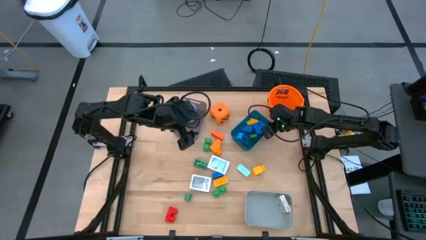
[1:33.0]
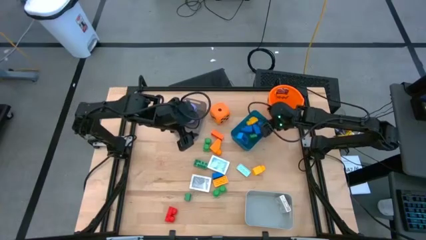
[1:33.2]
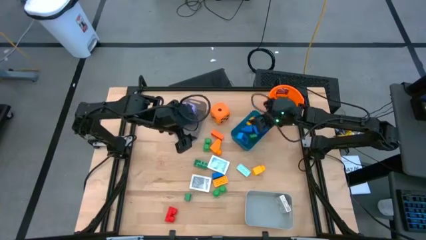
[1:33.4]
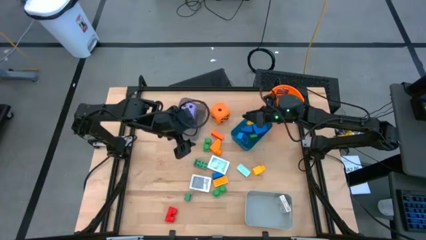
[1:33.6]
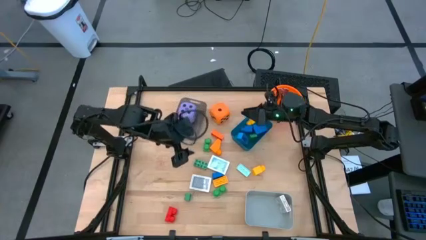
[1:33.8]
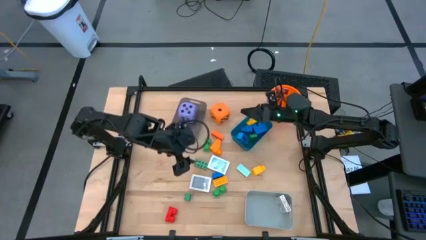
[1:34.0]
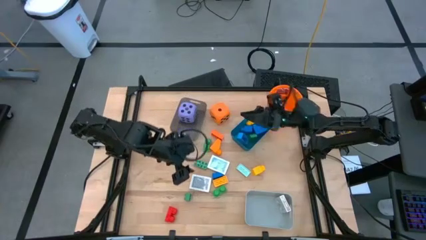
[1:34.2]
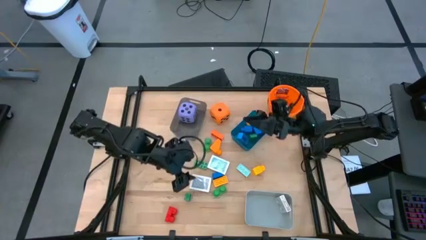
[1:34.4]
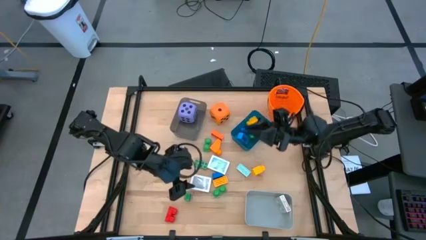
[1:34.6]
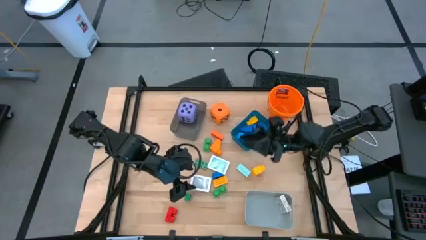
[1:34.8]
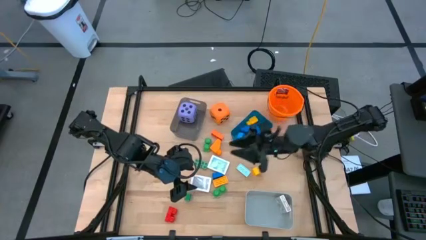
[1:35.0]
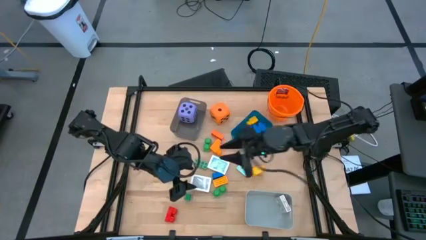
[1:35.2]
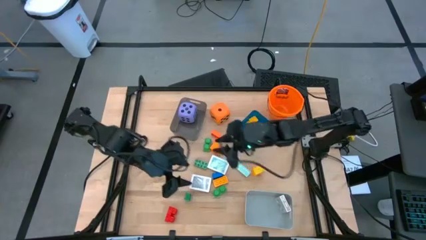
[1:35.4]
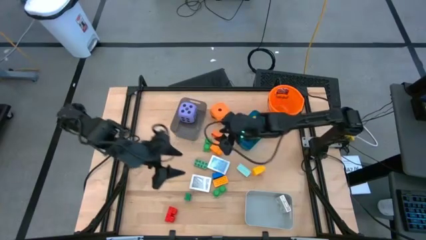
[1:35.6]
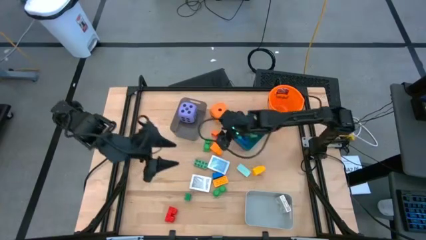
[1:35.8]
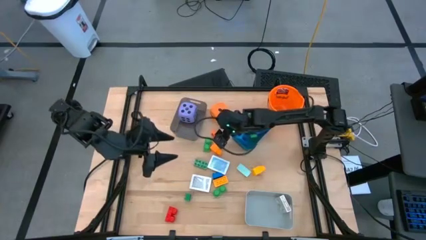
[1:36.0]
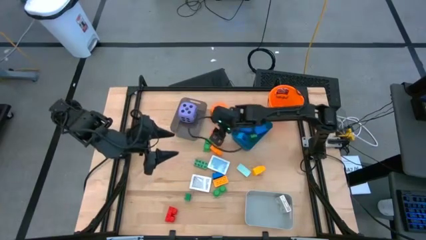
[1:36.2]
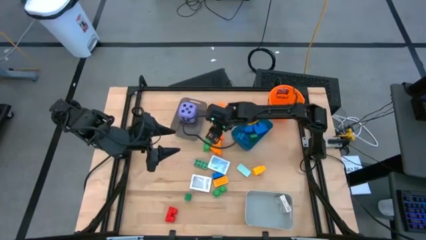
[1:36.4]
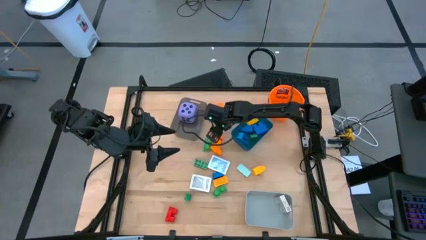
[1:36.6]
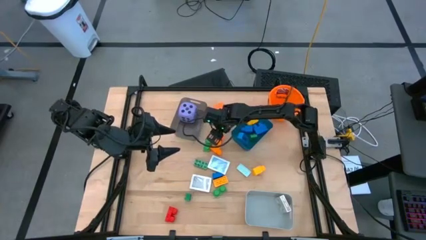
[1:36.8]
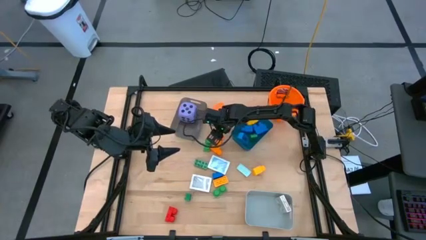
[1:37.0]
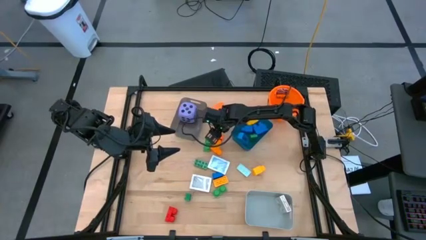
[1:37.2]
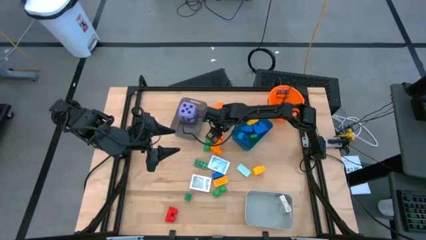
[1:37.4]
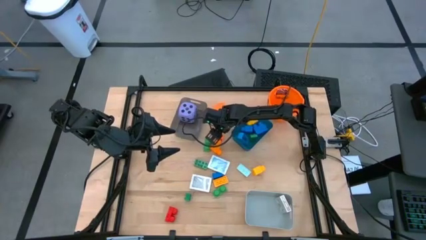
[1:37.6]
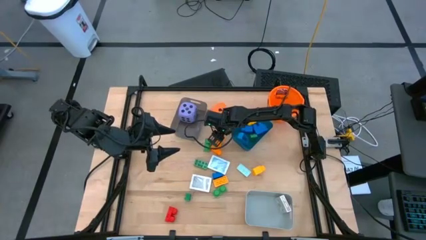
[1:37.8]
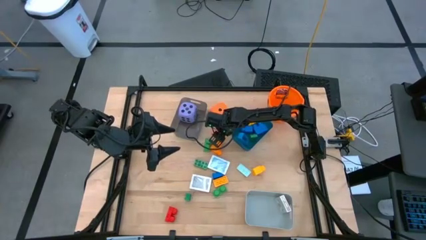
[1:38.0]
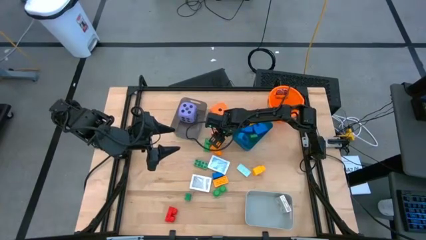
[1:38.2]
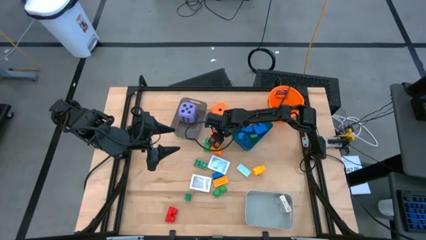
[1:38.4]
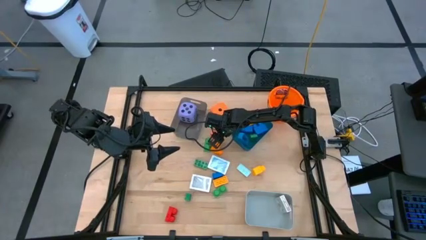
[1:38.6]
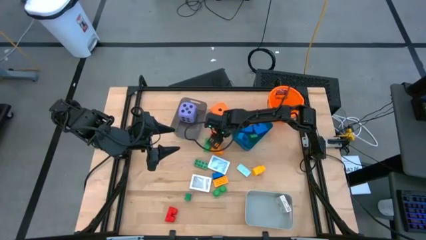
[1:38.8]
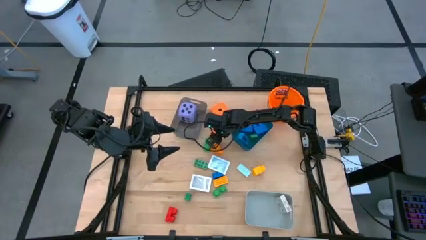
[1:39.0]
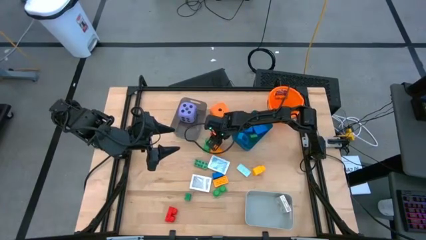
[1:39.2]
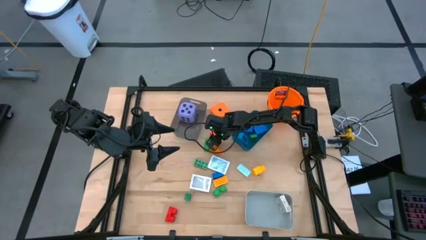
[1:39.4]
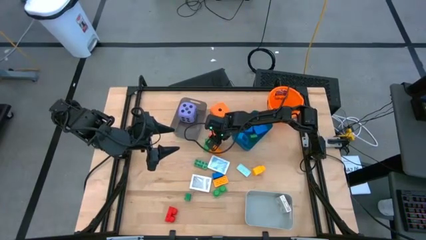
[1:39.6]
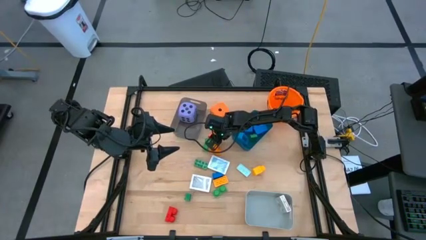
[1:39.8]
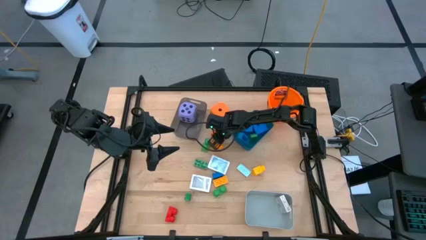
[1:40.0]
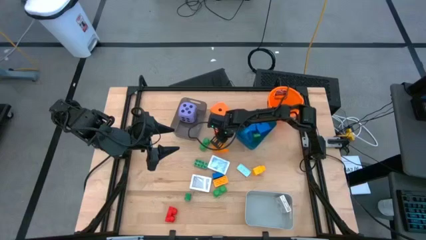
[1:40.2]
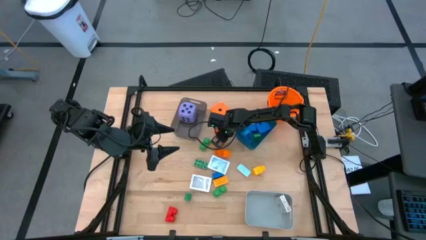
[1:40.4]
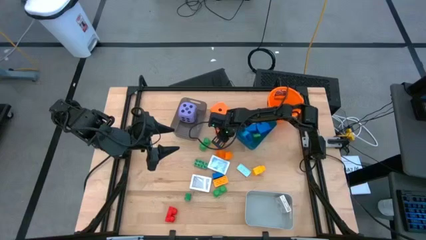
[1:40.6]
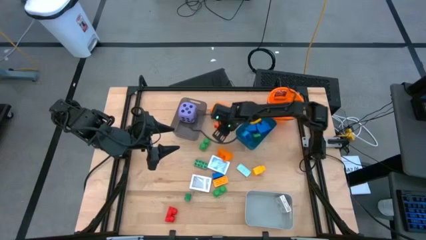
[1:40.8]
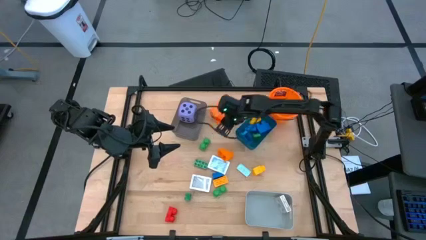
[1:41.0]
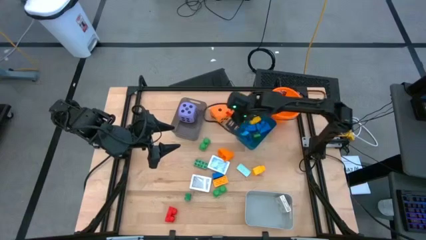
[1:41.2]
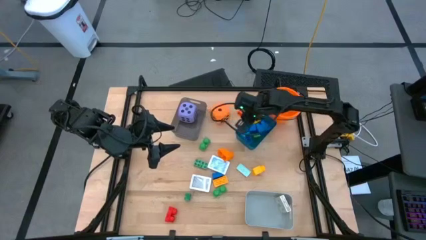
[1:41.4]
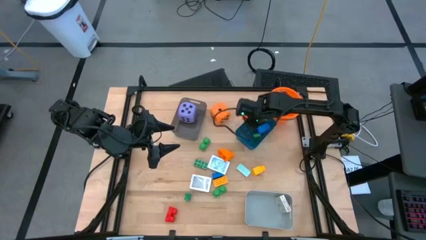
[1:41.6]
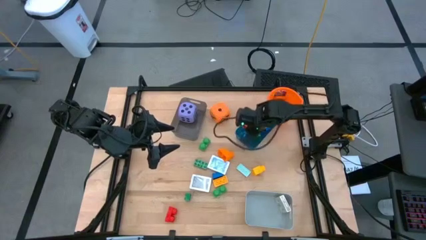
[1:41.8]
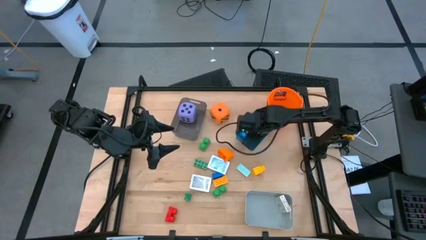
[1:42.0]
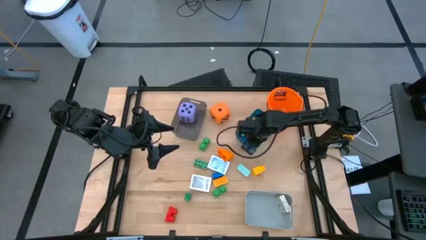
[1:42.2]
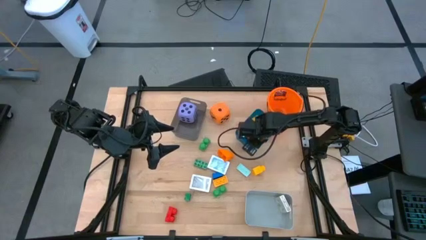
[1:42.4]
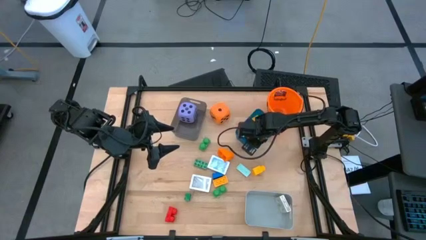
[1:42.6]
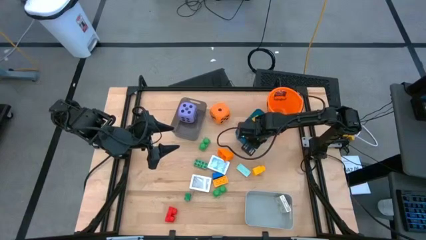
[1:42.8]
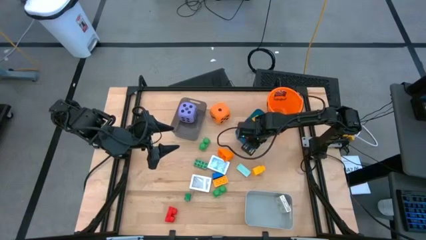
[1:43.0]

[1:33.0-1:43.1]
Task: Pick & Place Toys
Put the top orange game piece into the blue bin

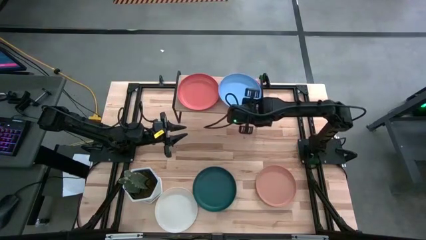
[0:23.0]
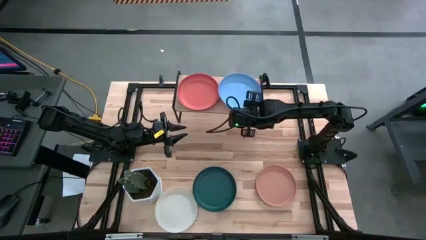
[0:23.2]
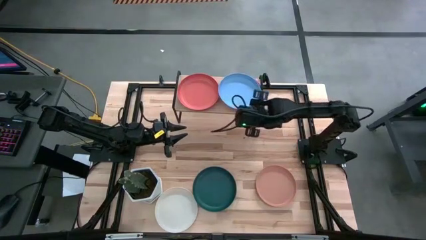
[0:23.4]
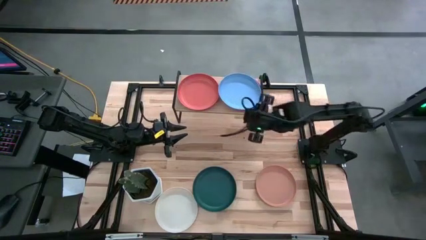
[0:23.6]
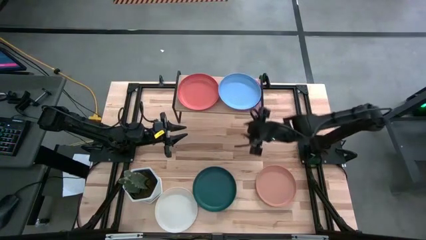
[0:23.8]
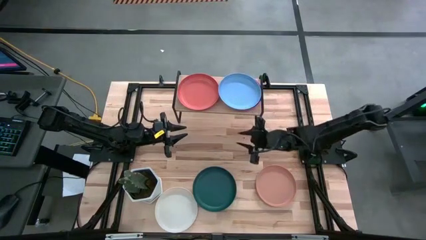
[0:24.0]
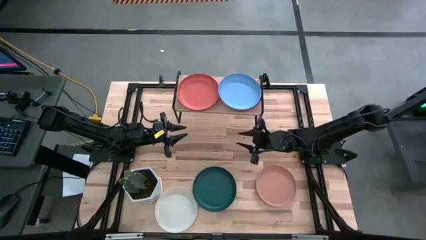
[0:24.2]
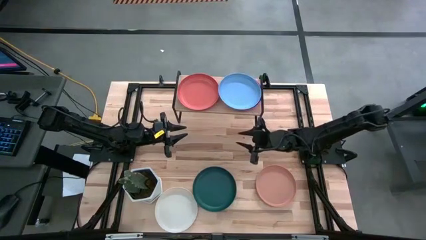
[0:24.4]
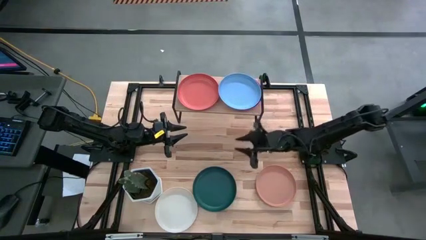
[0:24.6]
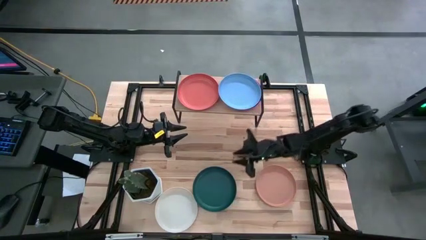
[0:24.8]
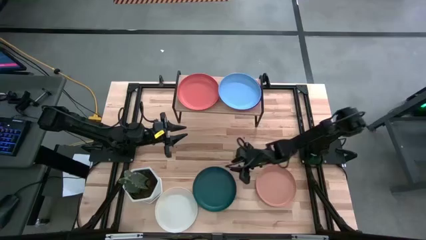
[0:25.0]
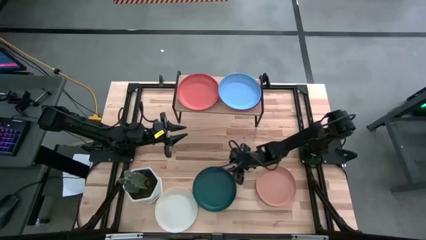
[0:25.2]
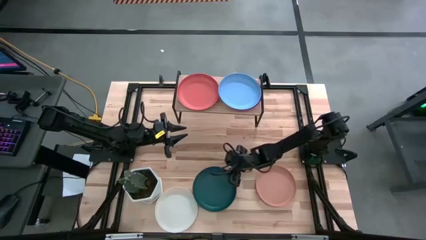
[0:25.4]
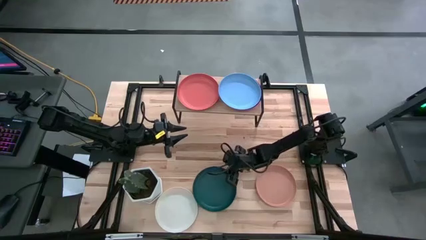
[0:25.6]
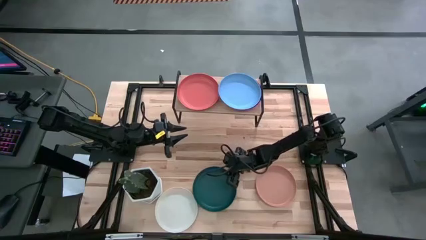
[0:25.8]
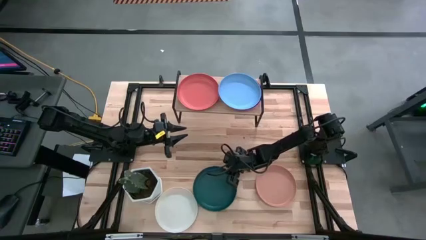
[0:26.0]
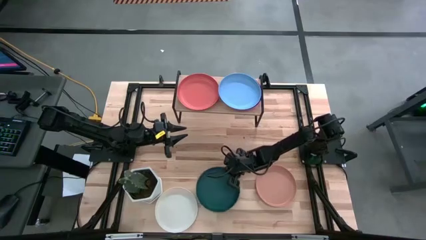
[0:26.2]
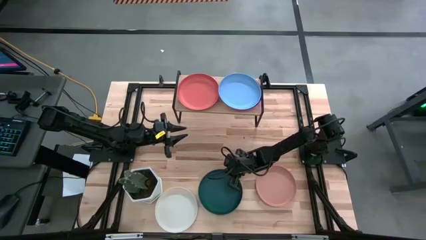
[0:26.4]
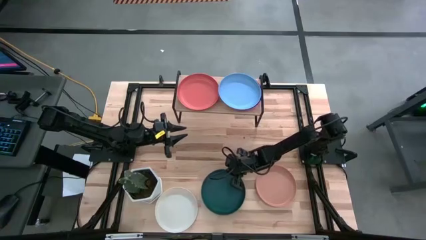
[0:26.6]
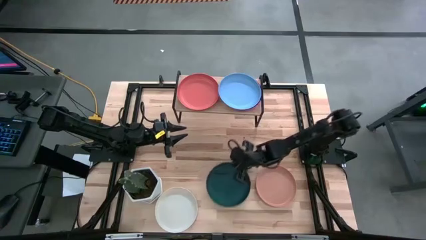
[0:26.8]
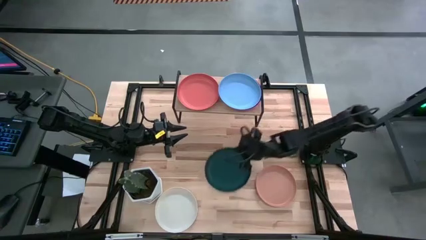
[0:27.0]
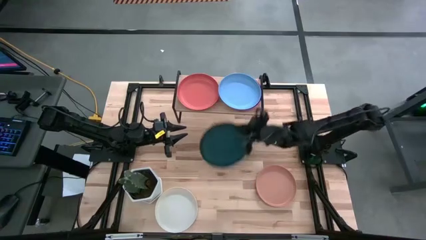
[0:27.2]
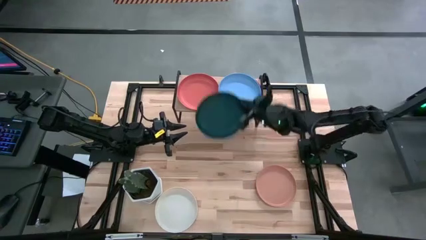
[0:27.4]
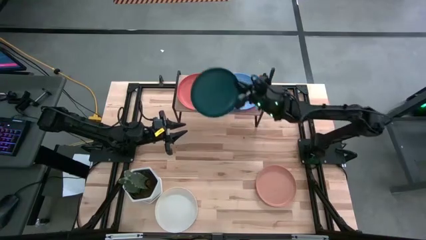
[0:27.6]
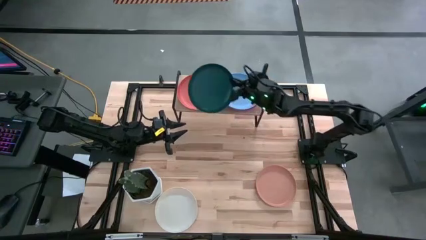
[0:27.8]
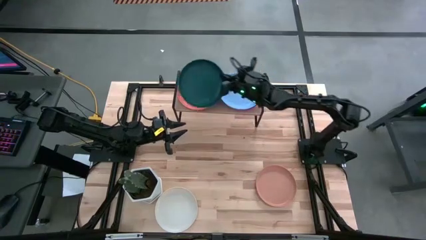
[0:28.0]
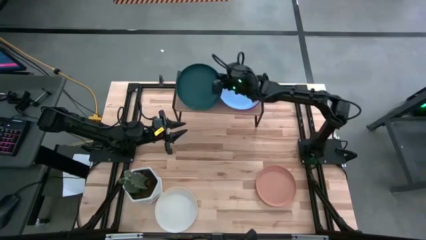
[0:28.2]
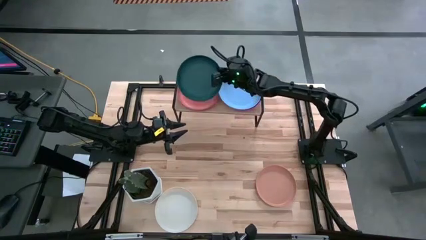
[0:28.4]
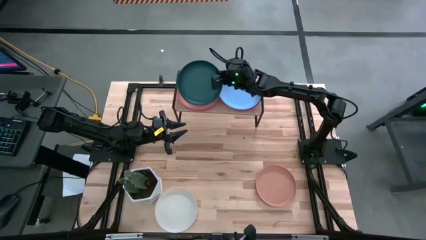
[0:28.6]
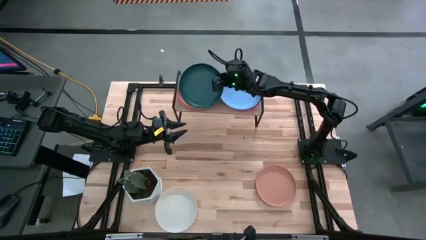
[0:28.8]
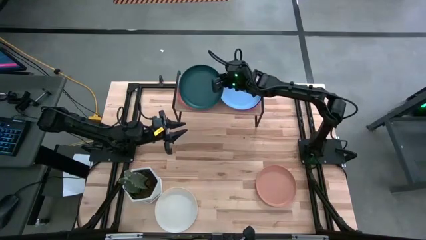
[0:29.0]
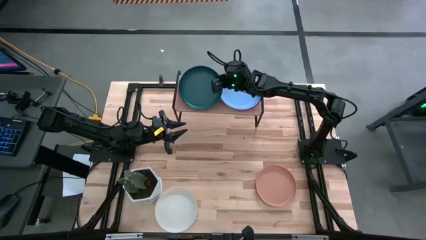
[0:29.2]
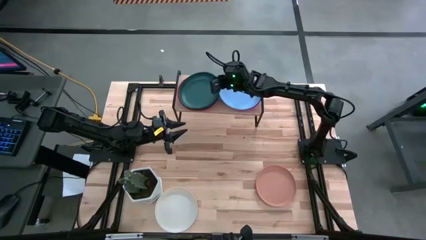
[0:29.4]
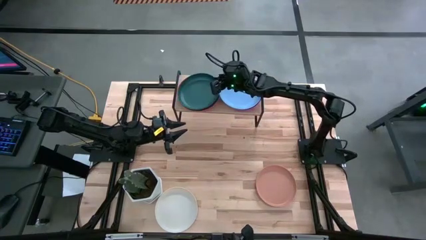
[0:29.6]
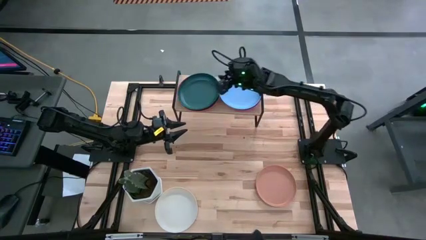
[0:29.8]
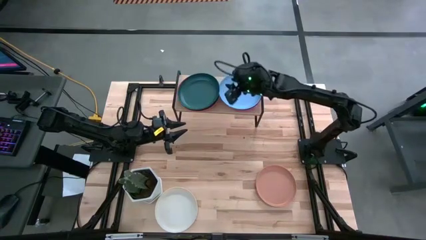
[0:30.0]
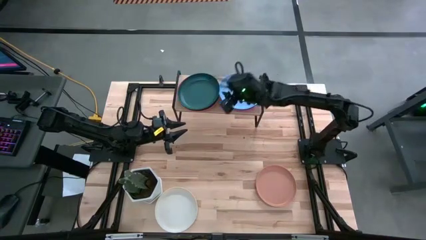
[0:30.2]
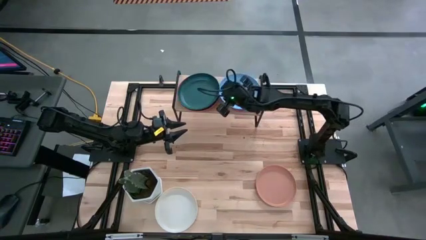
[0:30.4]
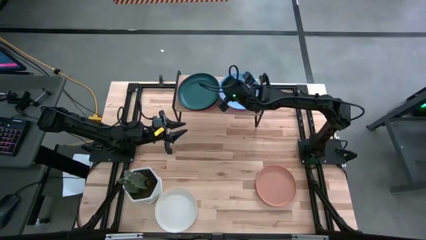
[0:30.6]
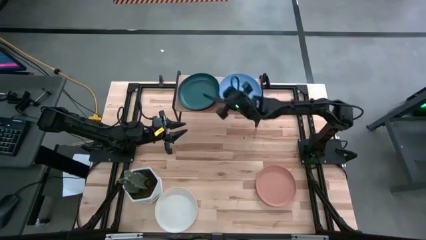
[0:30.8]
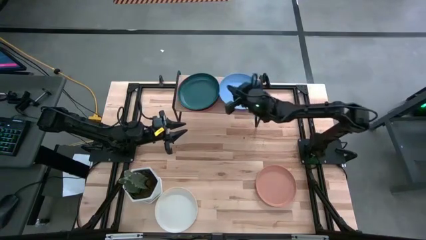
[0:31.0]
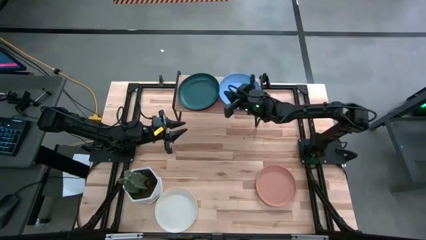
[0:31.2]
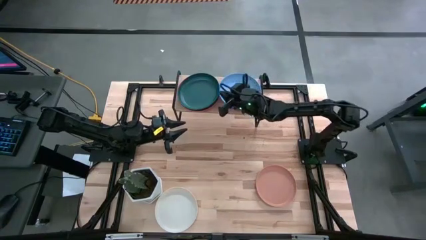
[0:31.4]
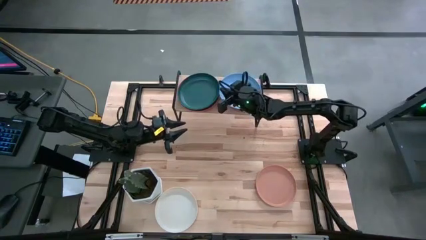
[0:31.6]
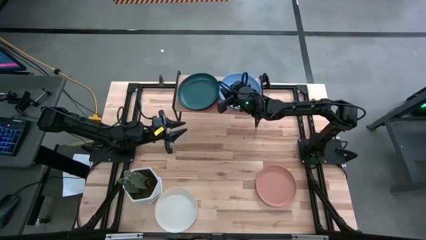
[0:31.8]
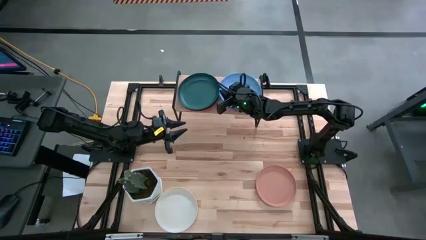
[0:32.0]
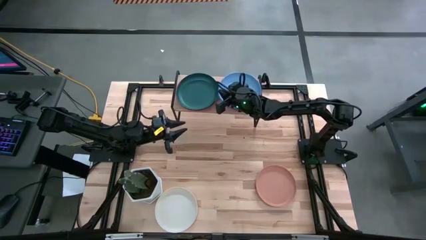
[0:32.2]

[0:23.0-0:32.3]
Task: Place and stack plates onto a shelf
Stack the dark green plate on top of the orange plate on the shelf
